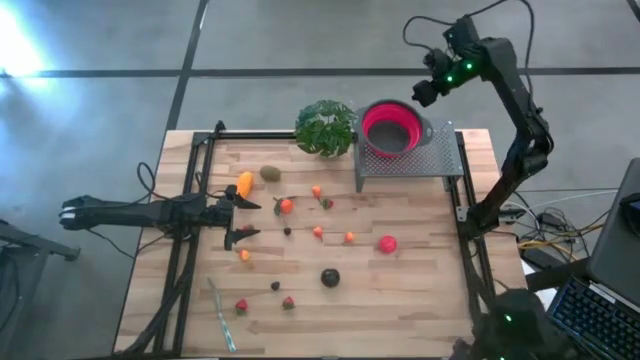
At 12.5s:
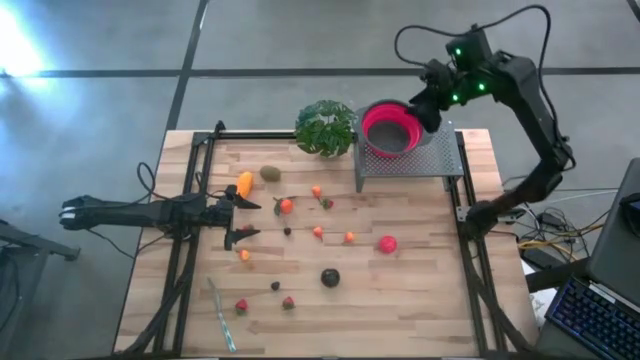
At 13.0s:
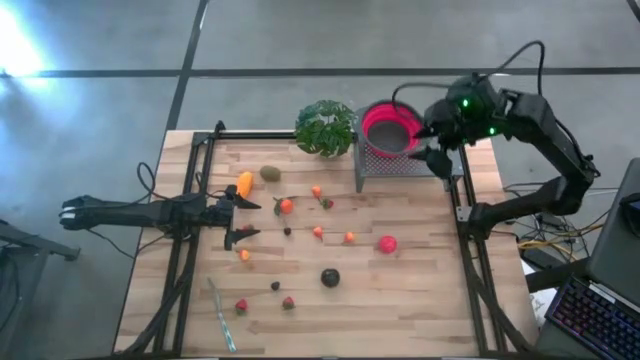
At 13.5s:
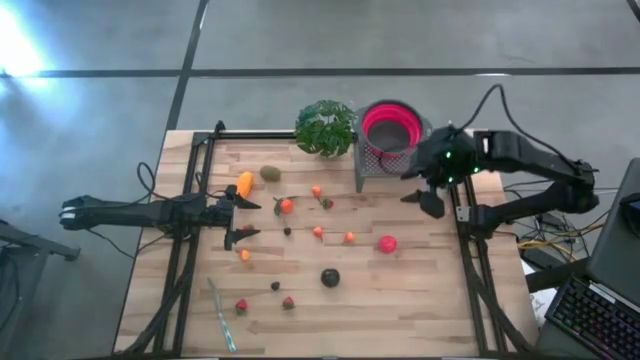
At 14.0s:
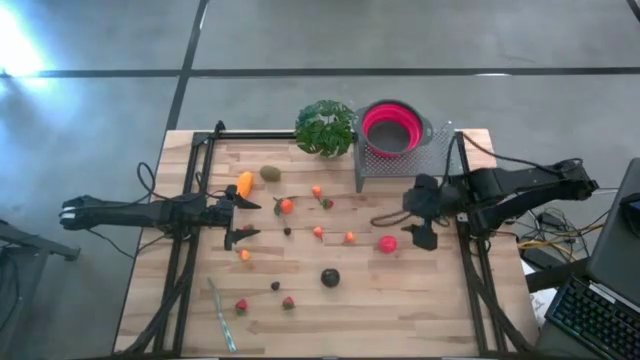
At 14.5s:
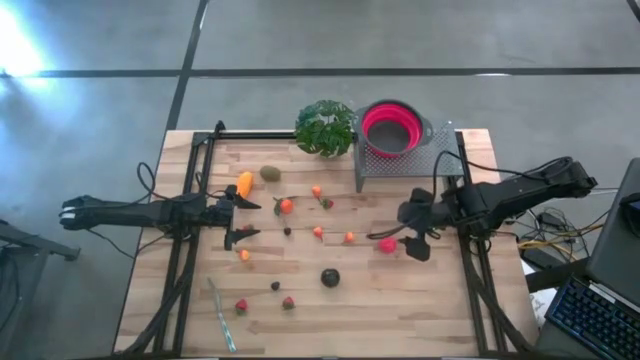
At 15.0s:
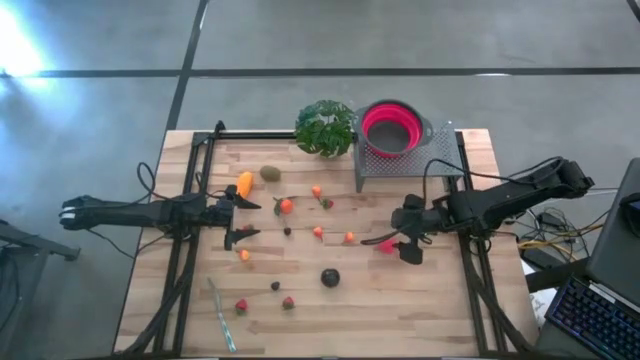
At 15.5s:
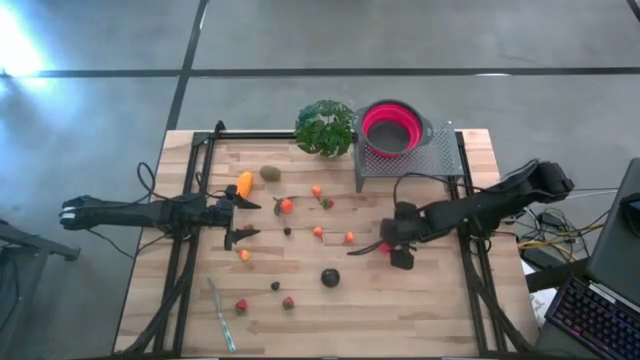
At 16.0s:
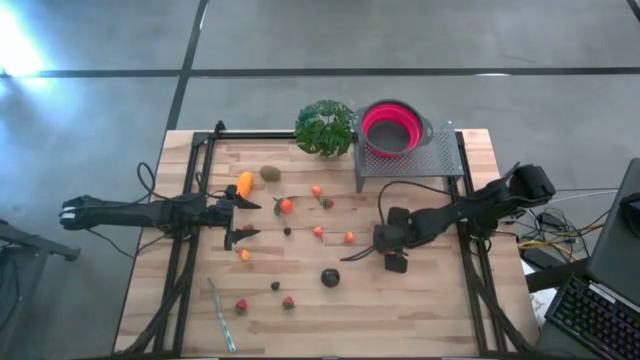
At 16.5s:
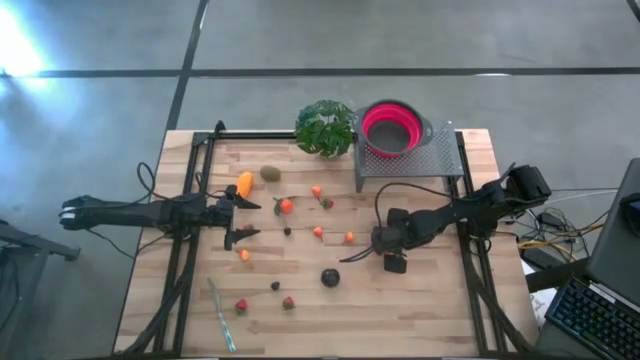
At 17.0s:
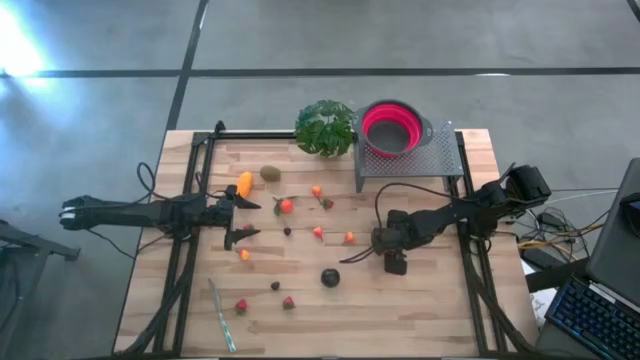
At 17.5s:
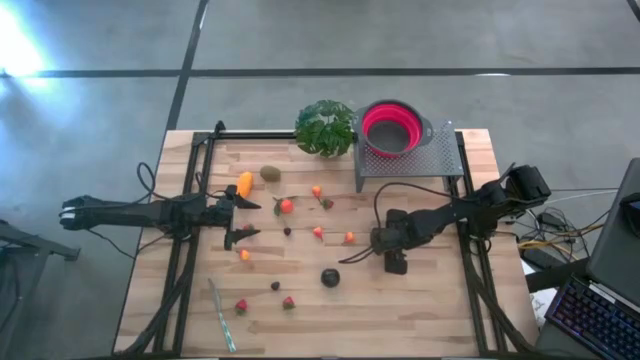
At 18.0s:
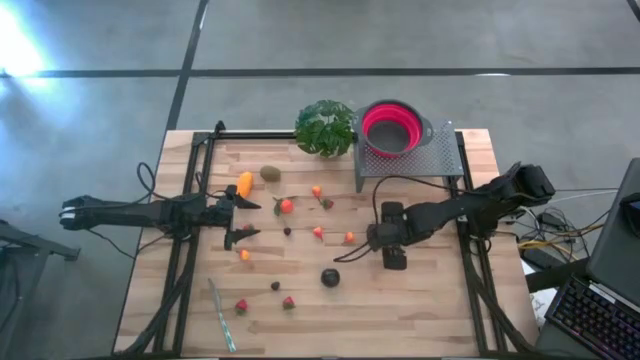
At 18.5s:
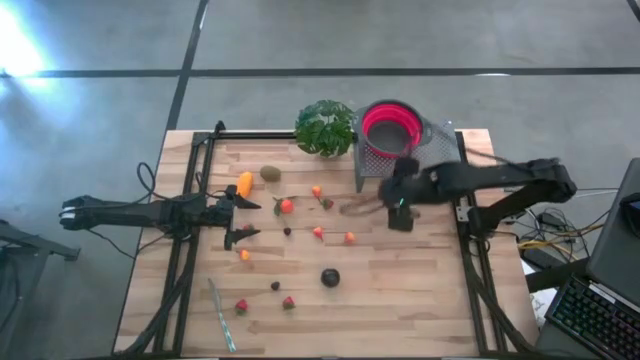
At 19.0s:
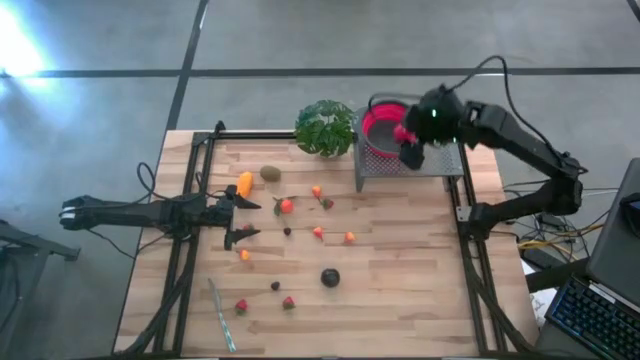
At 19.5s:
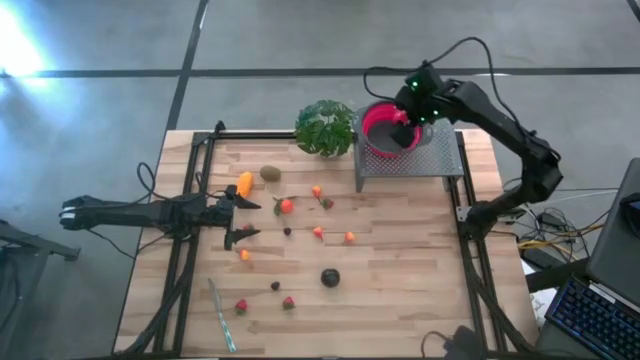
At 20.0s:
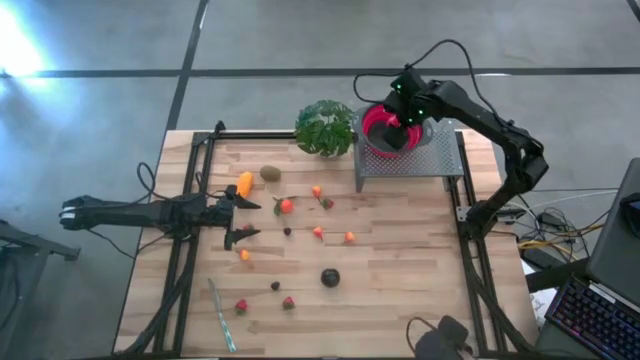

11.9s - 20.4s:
Task: Pick & Place Fruit
Put the tomato into the red strainer bowl on the shelf

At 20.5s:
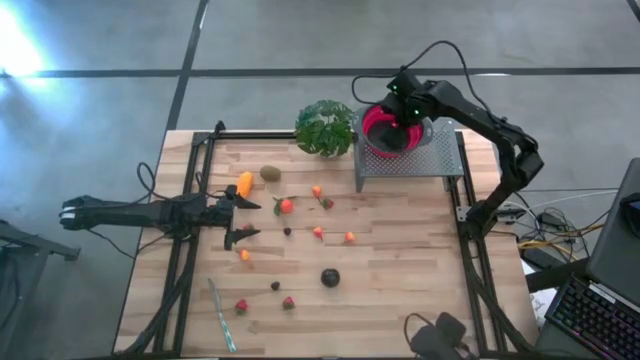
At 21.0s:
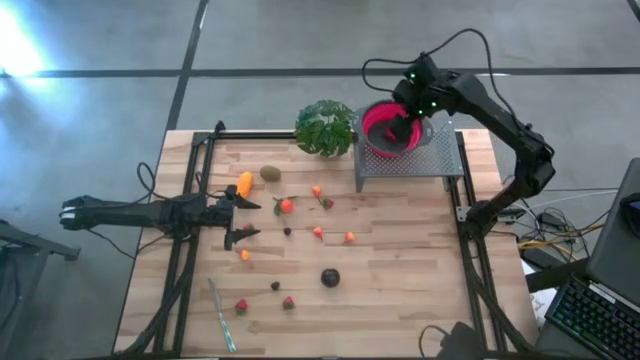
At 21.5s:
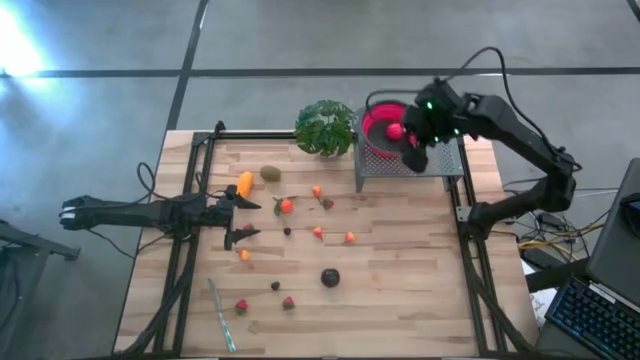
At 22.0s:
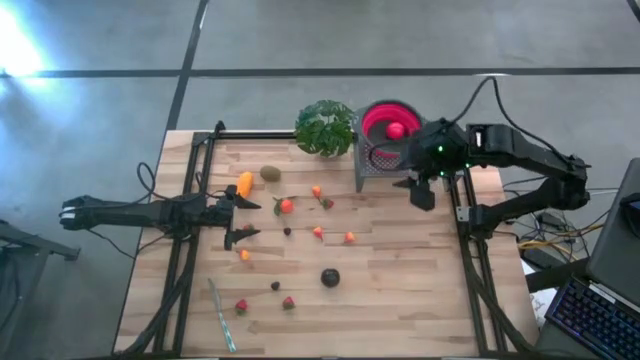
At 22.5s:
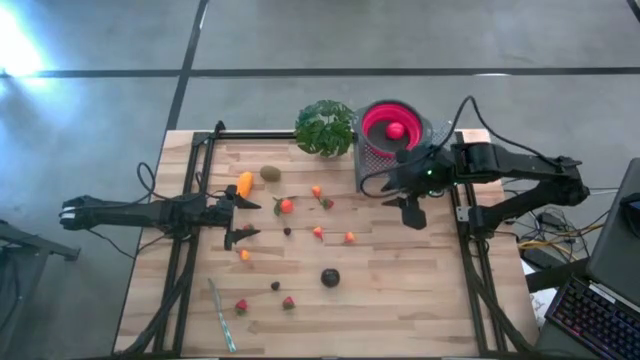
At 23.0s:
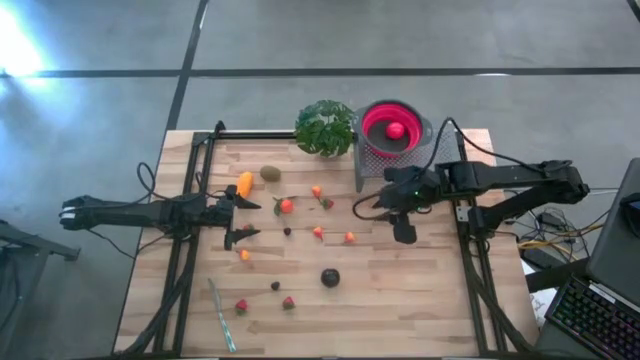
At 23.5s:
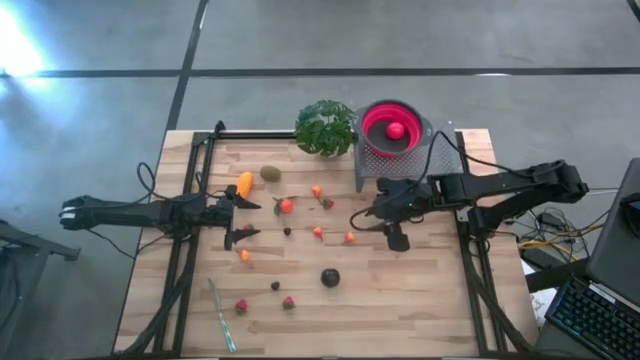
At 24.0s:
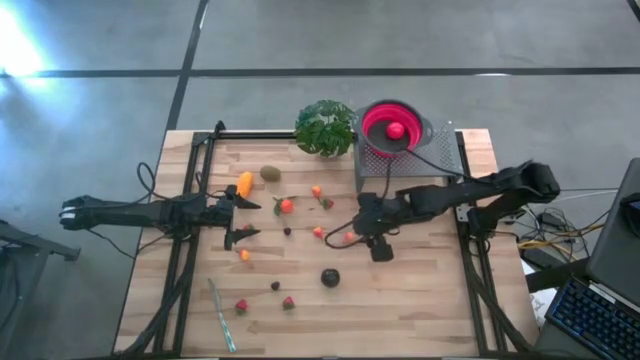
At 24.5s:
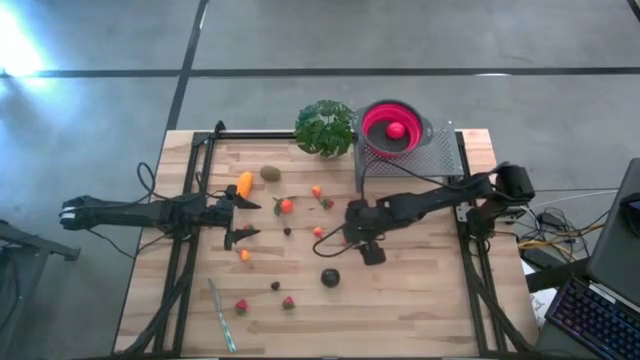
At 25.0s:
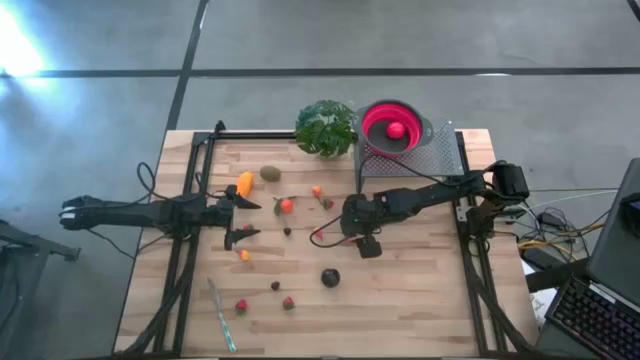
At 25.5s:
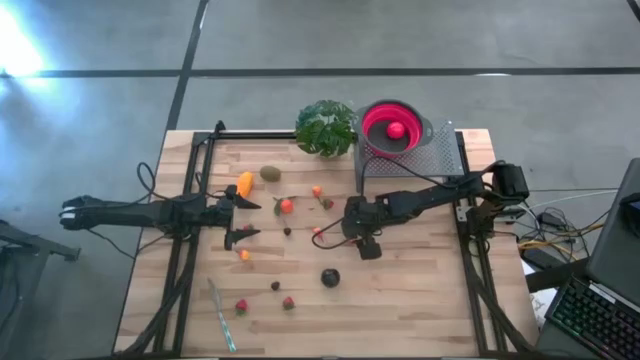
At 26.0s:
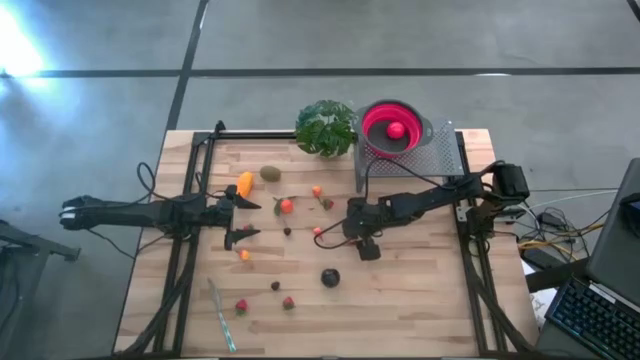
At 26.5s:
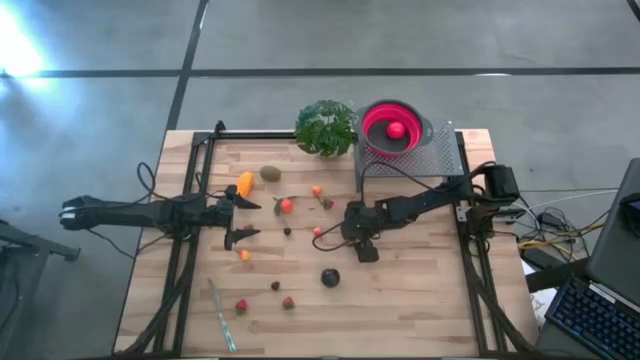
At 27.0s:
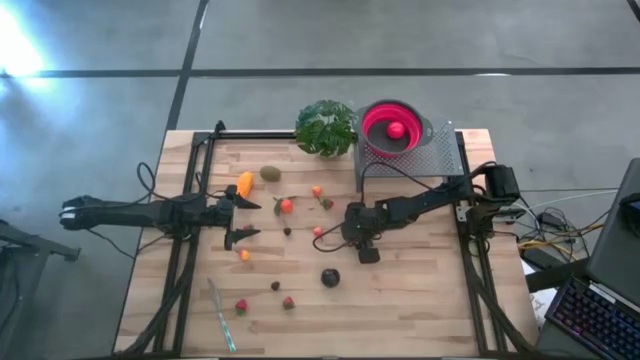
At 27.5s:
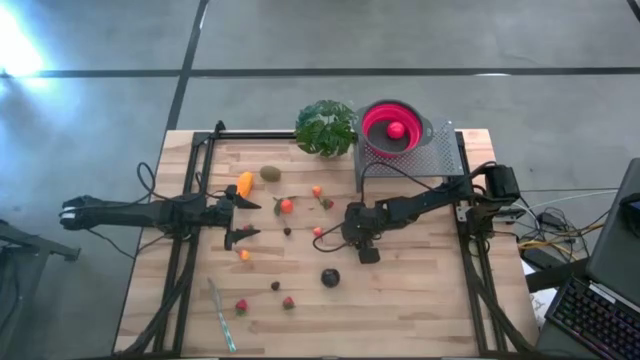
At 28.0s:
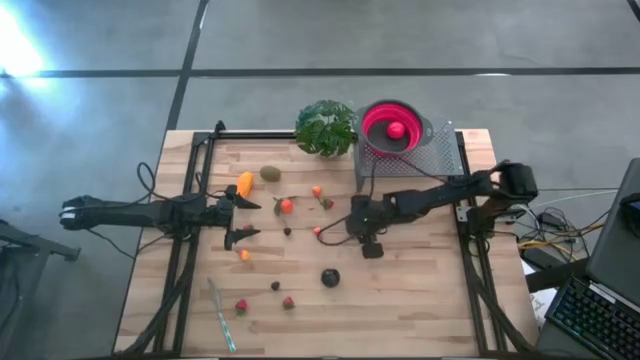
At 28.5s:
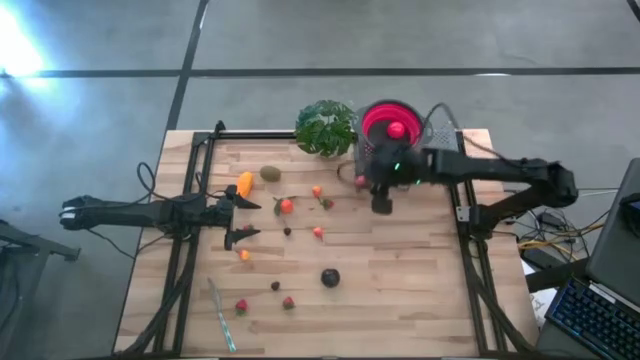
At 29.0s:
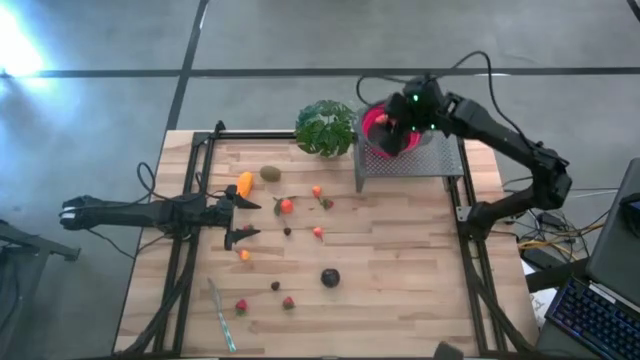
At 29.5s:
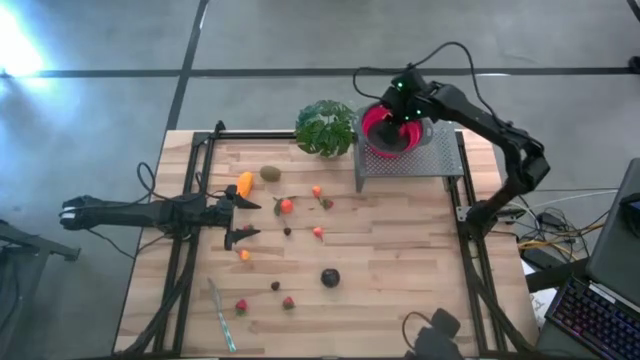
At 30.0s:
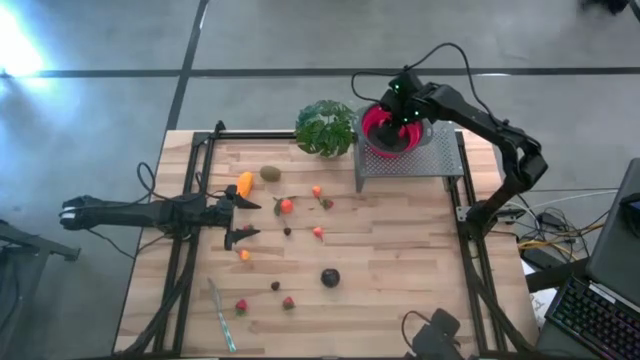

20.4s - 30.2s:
Put the pear into the red strainer bowl on the shelf

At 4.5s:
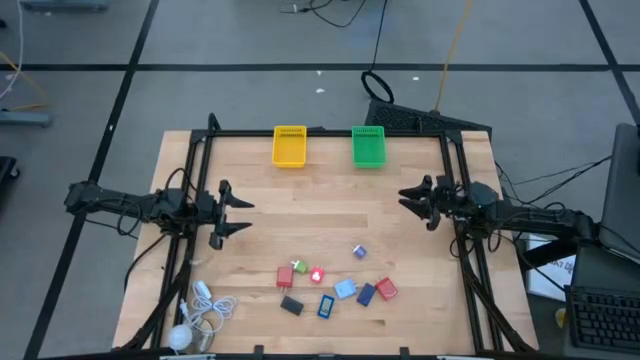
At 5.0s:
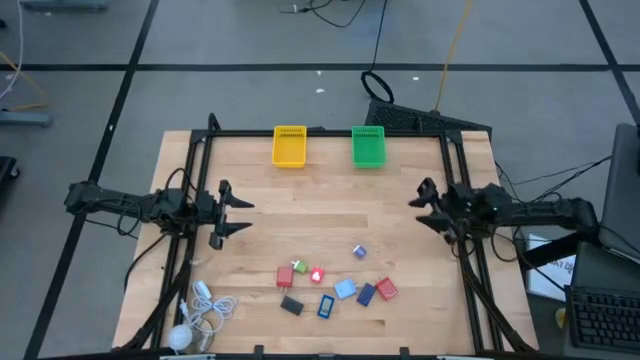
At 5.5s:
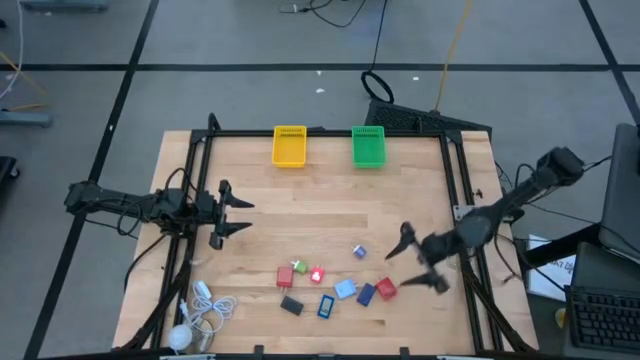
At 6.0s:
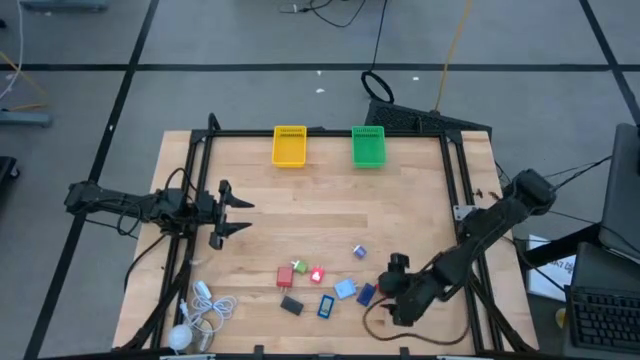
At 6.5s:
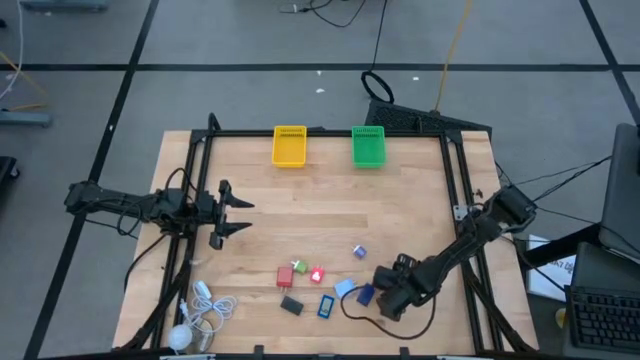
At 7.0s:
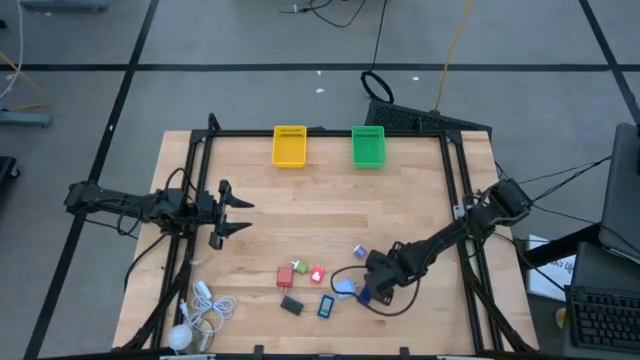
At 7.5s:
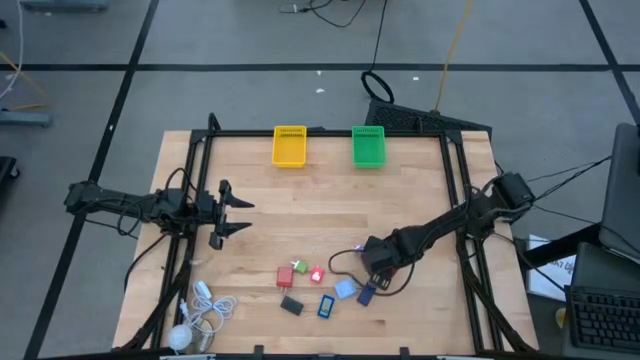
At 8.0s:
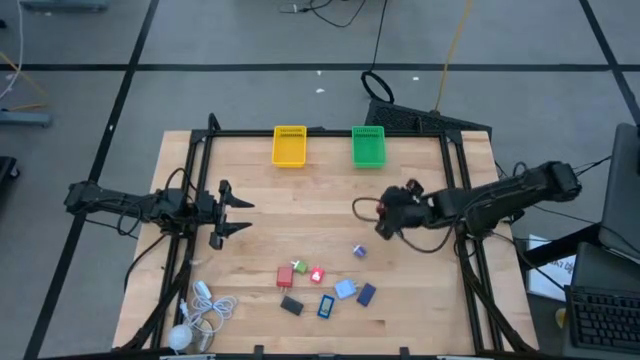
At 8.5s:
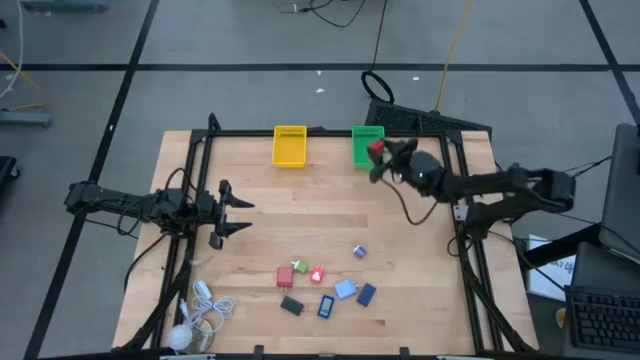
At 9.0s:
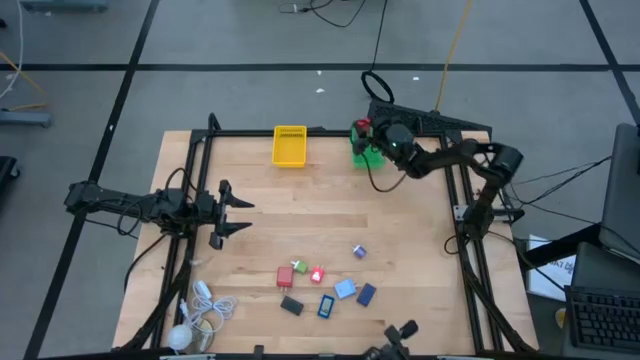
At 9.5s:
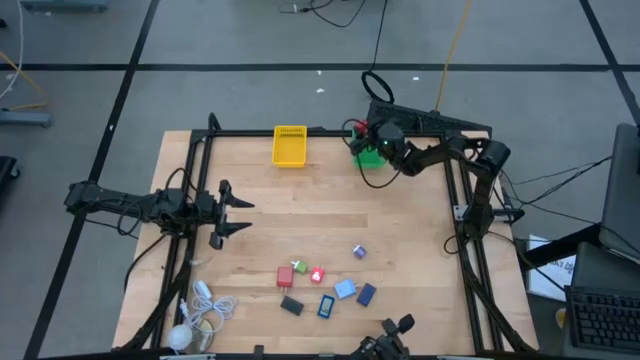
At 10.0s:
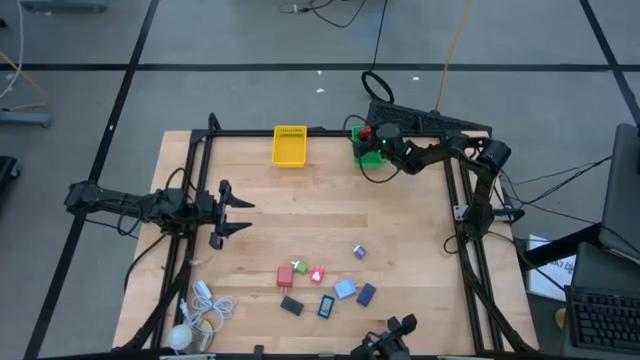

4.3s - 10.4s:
Task: Pick & Place Office items
Put the right red charger adapter into the green bin
